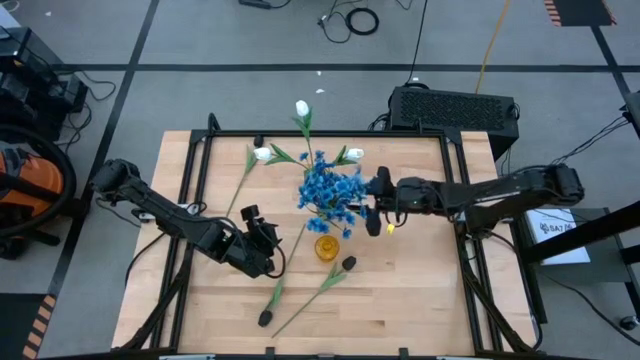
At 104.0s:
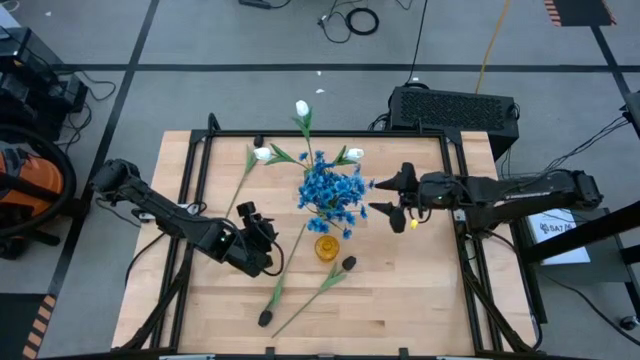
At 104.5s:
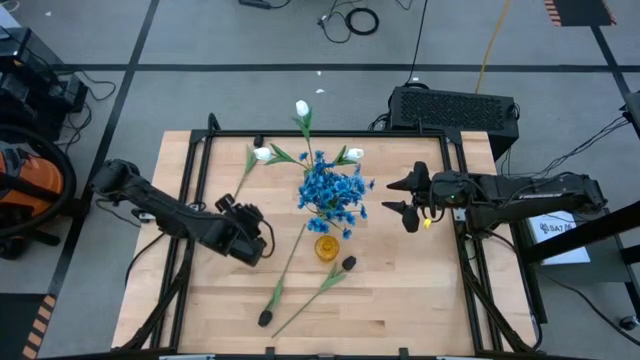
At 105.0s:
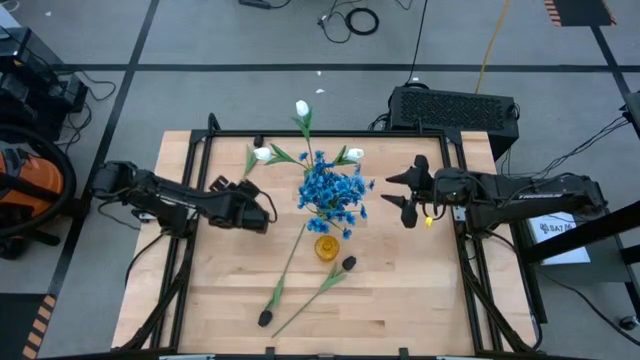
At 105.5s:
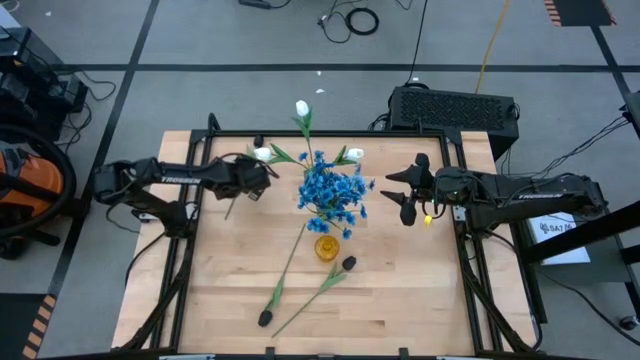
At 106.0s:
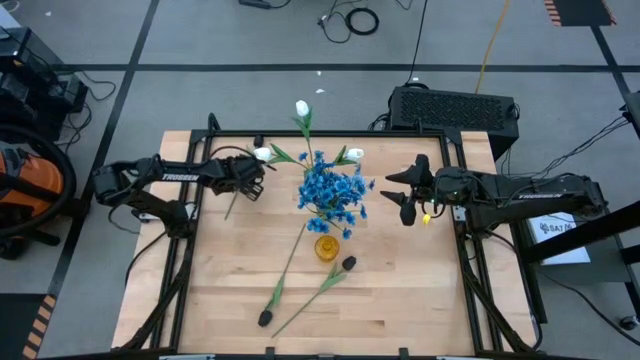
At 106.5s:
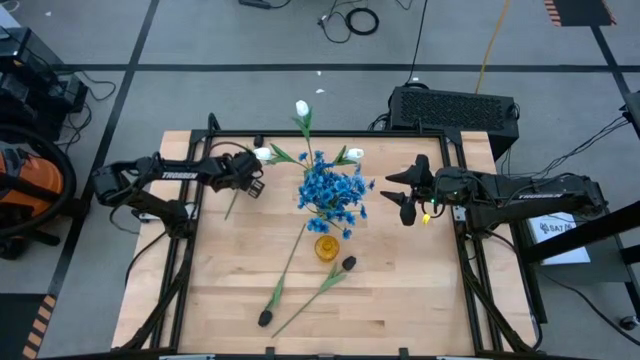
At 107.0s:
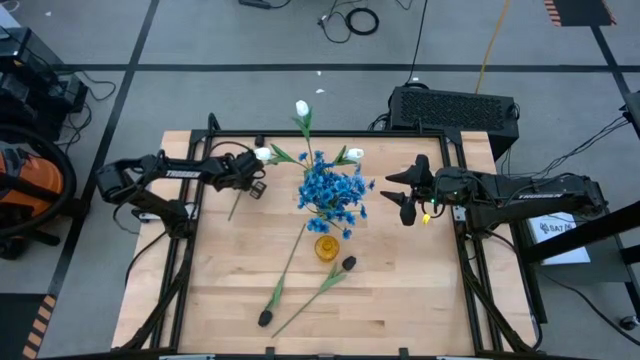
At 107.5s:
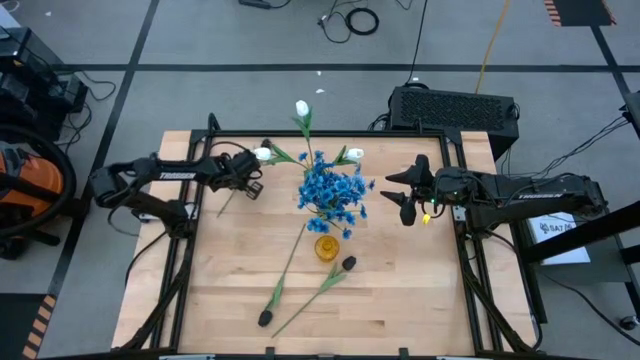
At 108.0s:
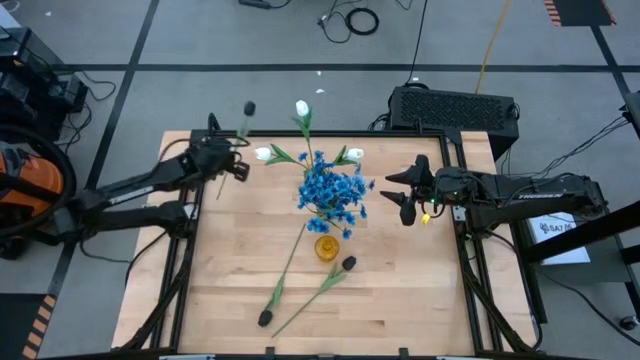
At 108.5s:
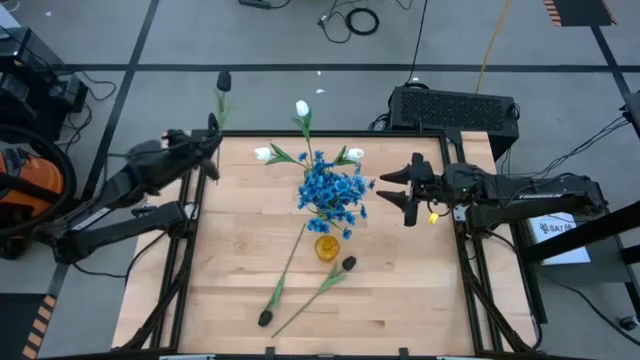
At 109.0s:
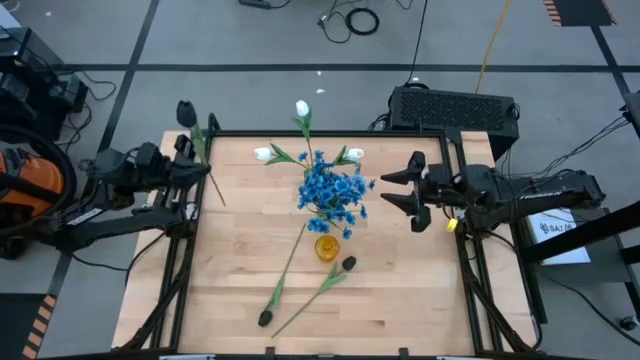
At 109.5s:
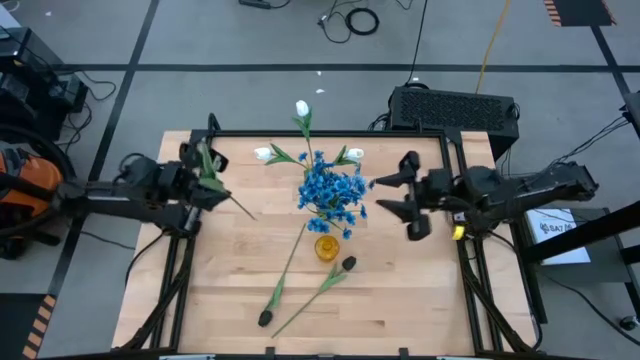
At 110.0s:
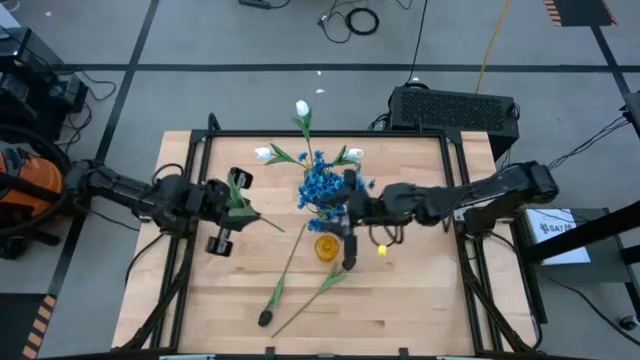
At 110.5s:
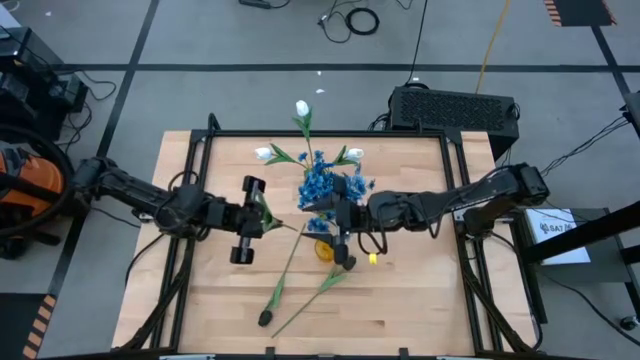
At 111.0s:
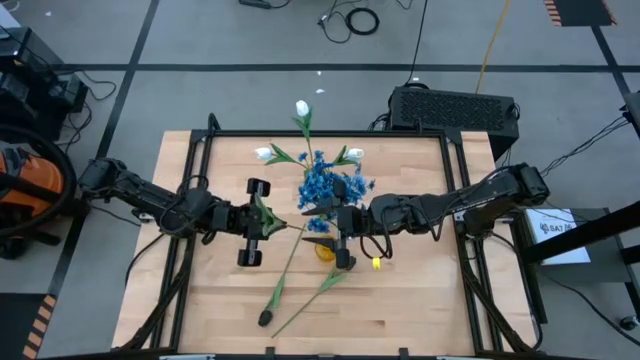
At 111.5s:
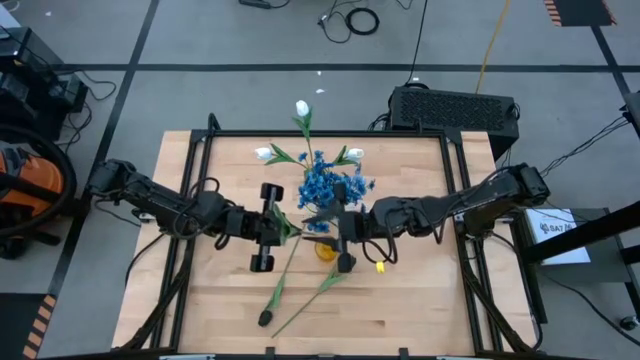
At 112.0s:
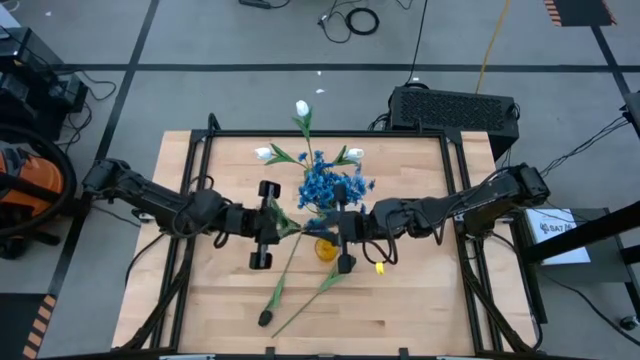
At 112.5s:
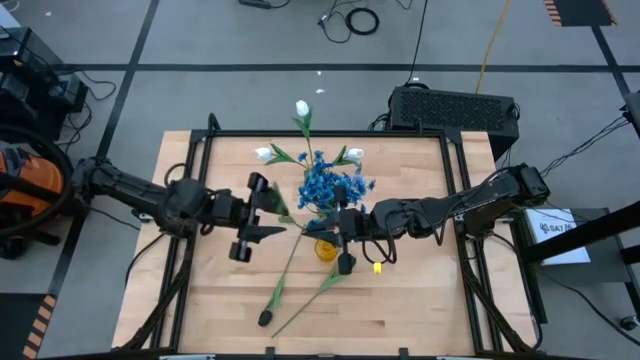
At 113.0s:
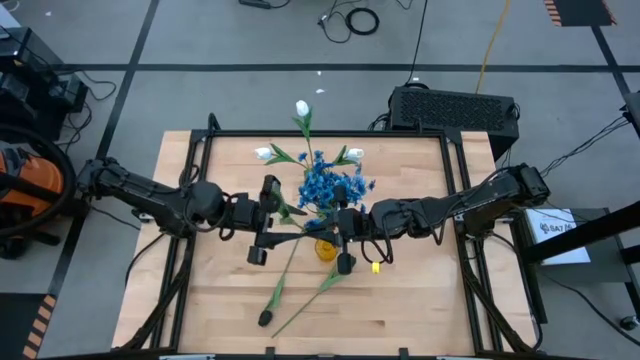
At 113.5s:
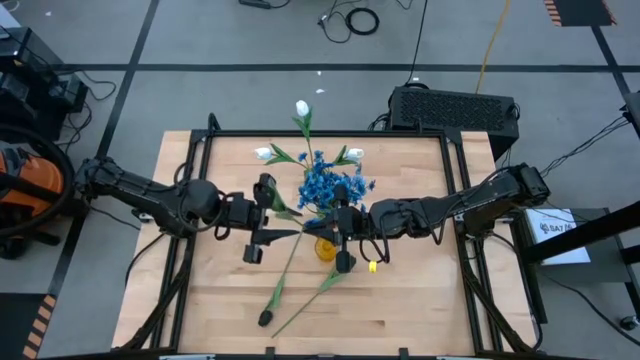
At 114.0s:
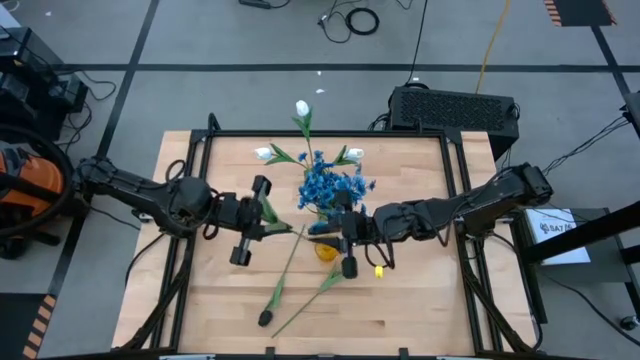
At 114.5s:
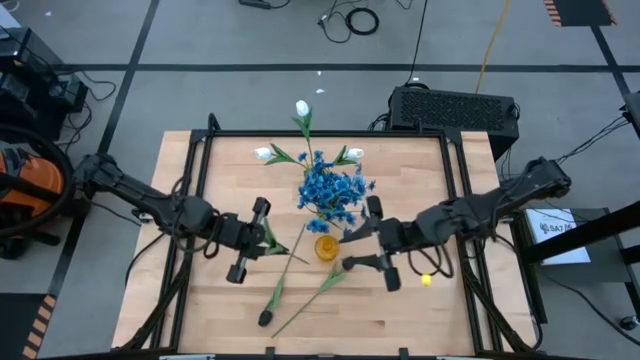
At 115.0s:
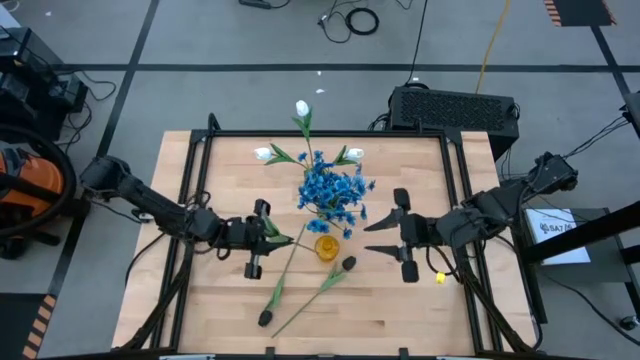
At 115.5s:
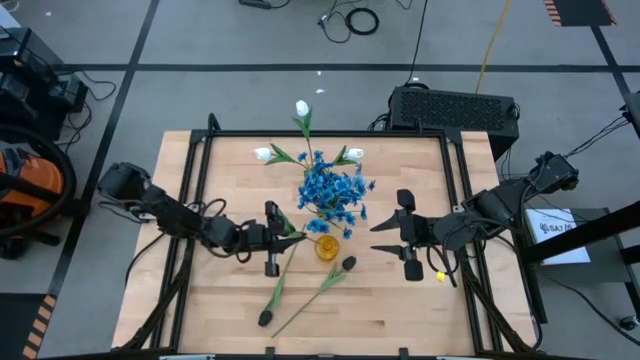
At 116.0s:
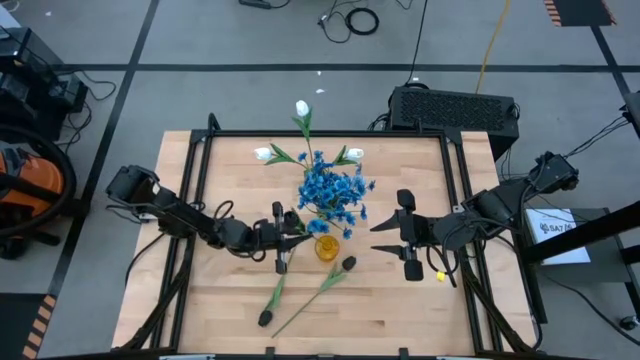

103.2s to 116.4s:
Task: Sort flowers into vase by color
Put the top left black flower into the yellow vase

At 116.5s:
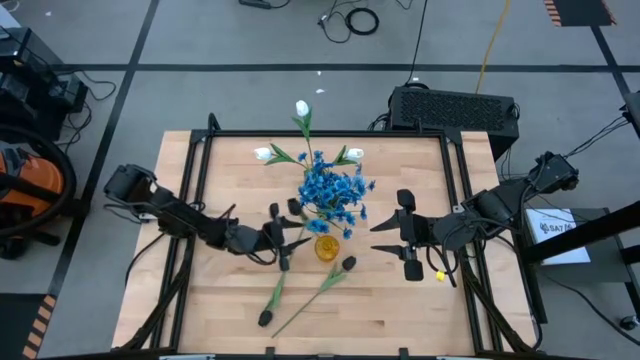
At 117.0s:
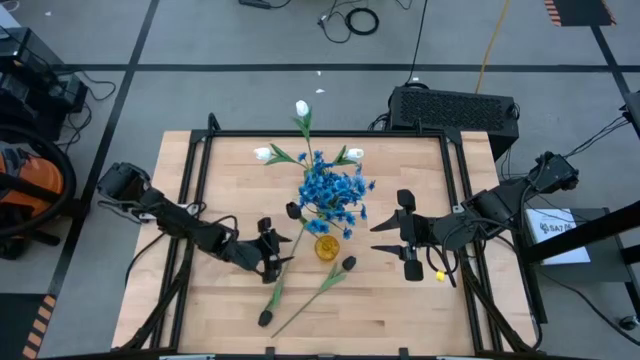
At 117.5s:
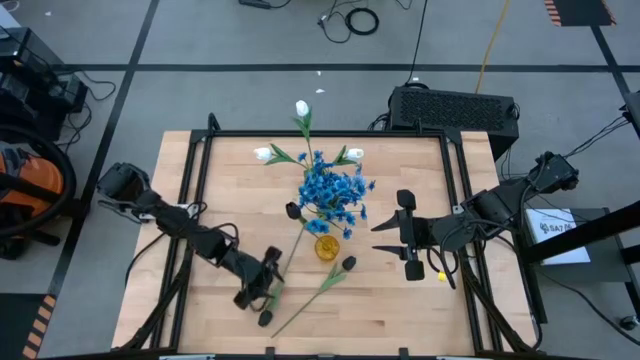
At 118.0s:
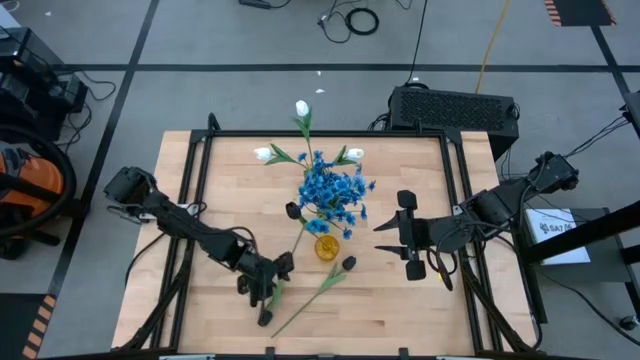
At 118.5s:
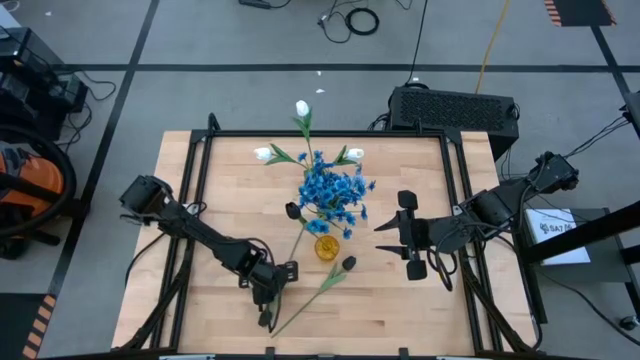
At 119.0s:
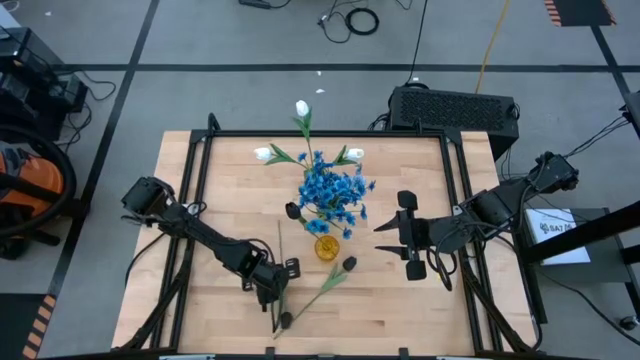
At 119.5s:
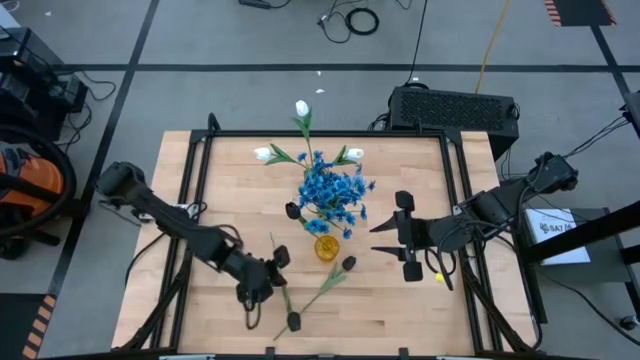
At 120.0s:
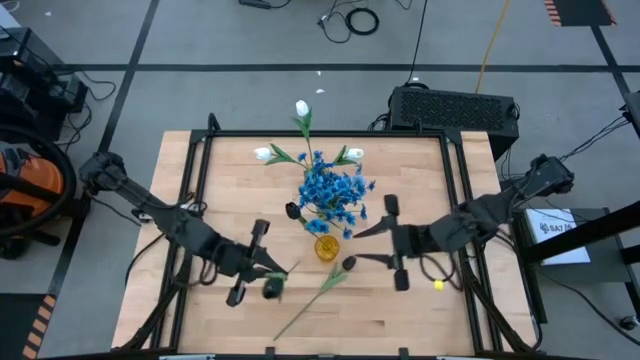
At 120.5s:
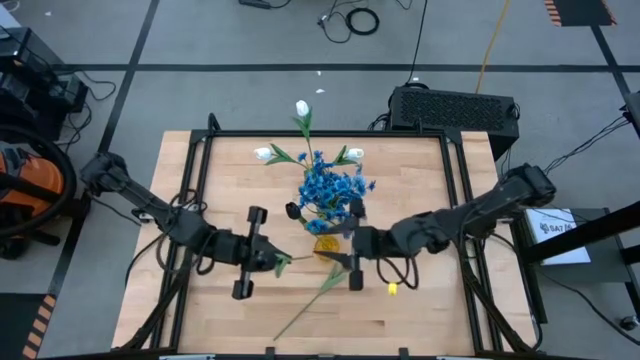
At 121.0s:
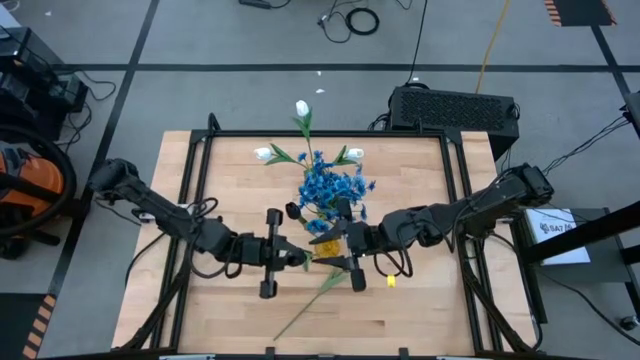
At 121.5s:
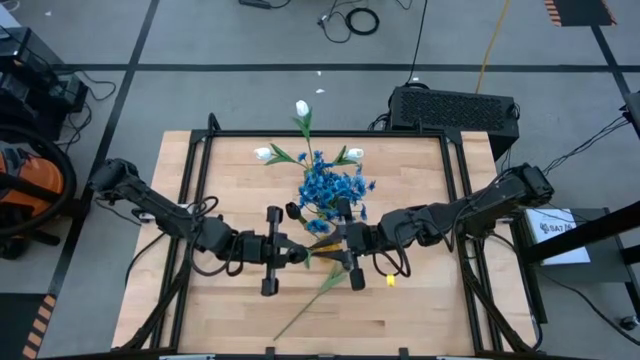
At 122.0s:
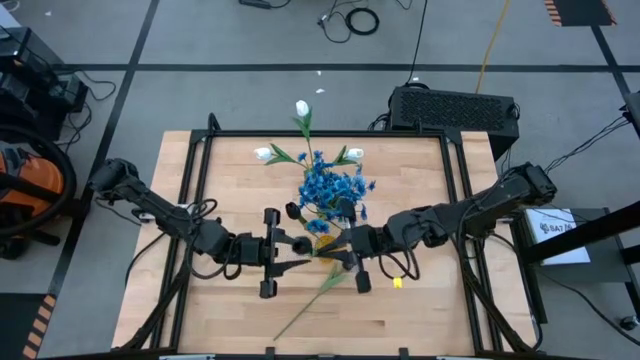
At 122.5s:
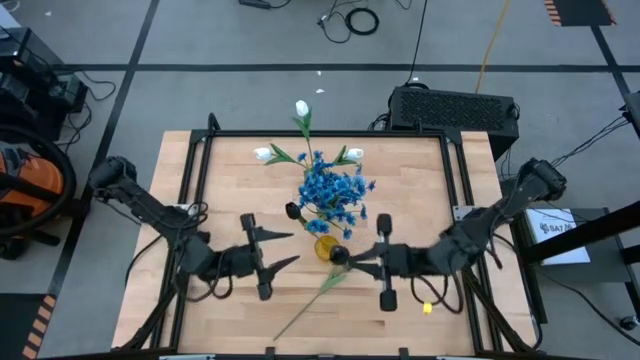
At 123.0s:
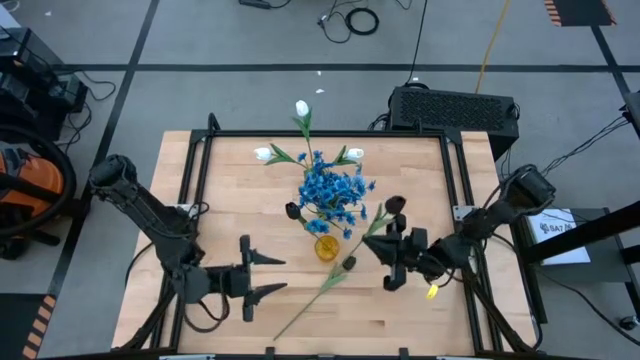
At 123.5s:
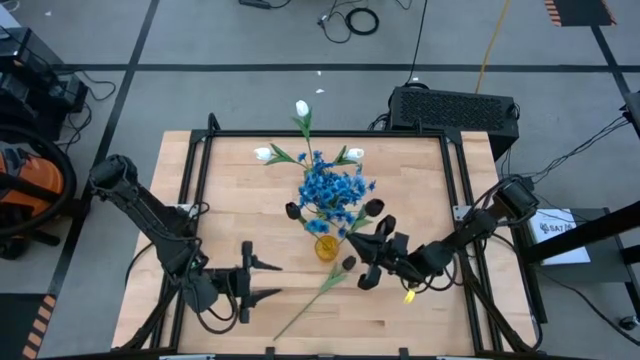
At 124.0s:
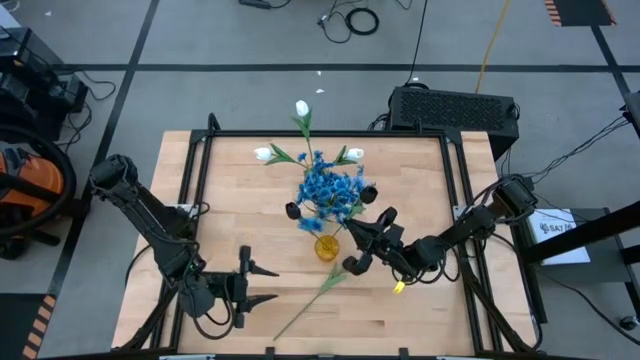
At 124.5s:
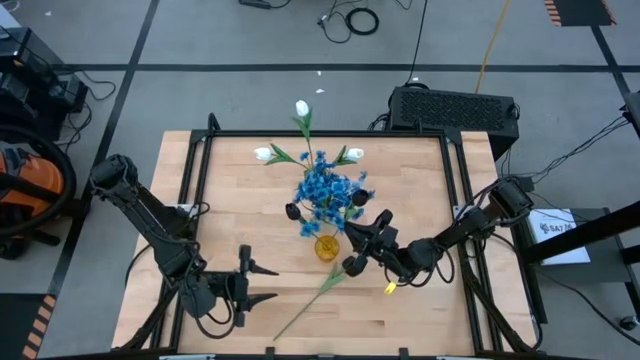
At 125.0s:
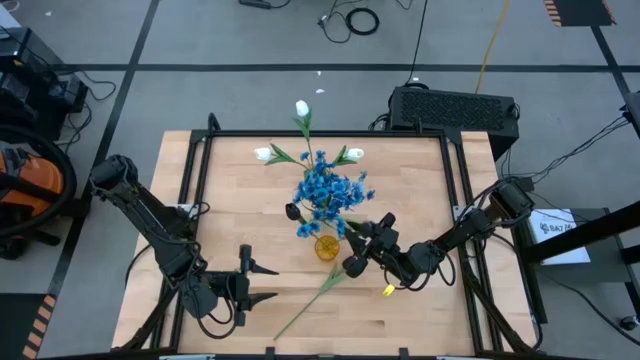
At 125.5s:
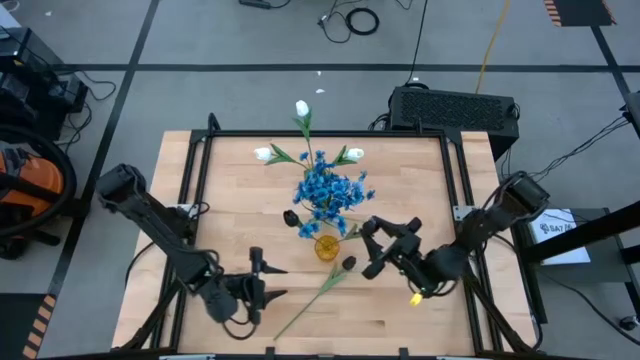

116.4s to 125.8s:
Put the left black flower into the yellow vase
